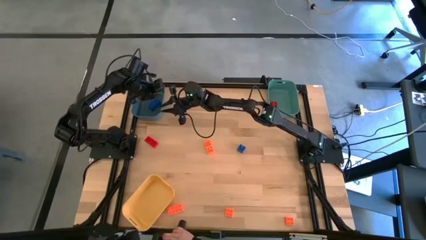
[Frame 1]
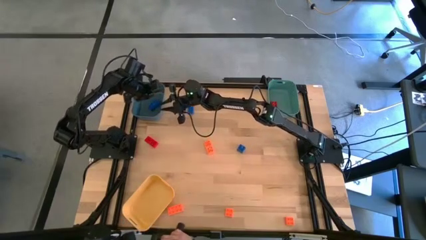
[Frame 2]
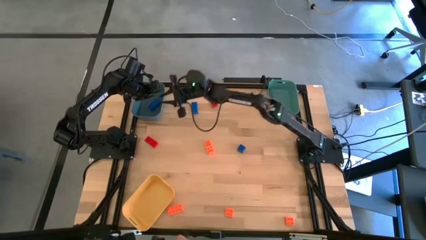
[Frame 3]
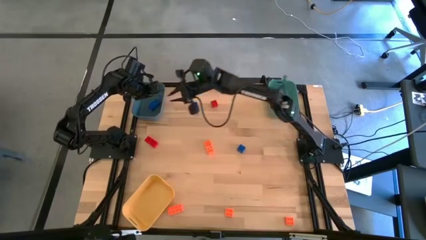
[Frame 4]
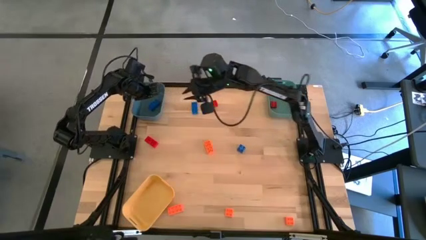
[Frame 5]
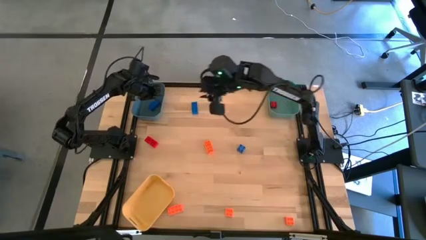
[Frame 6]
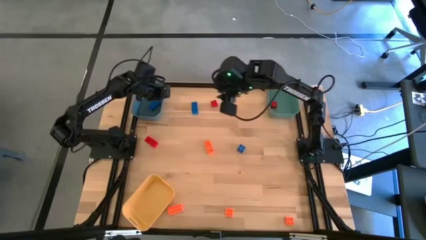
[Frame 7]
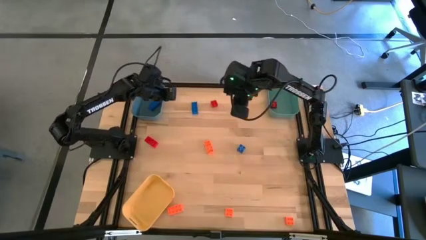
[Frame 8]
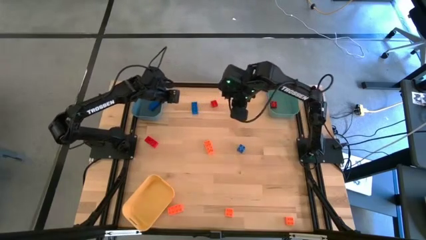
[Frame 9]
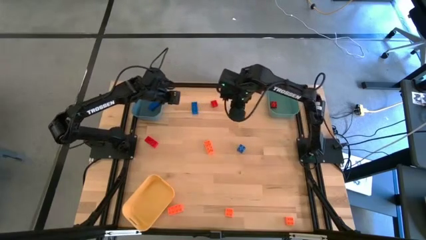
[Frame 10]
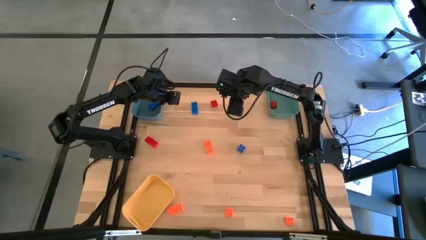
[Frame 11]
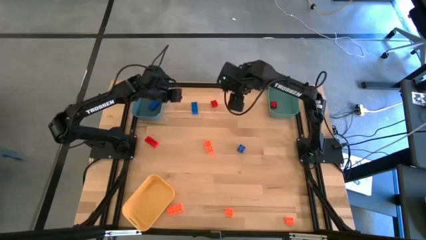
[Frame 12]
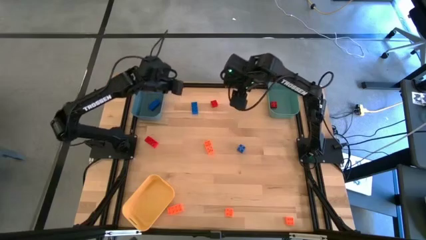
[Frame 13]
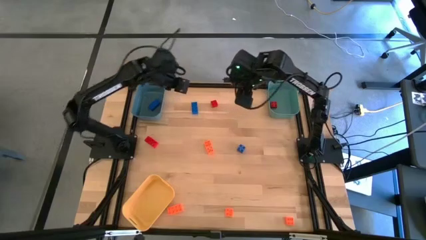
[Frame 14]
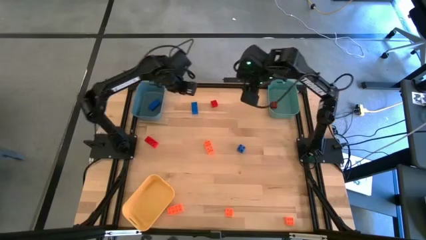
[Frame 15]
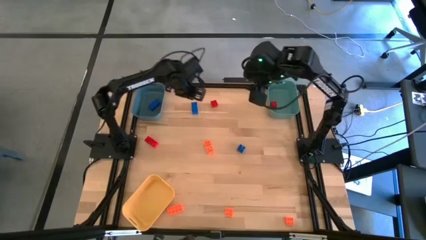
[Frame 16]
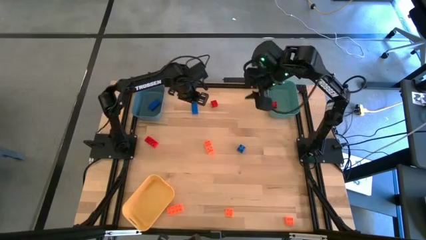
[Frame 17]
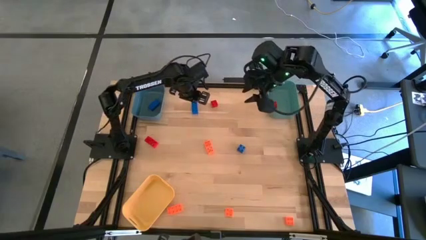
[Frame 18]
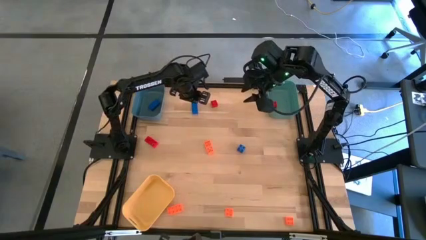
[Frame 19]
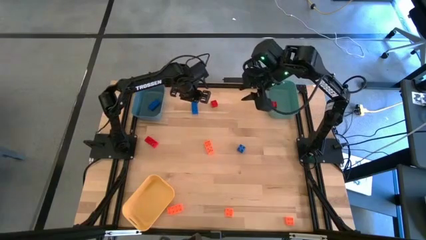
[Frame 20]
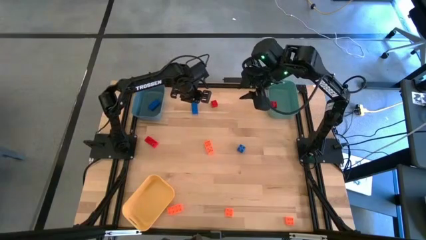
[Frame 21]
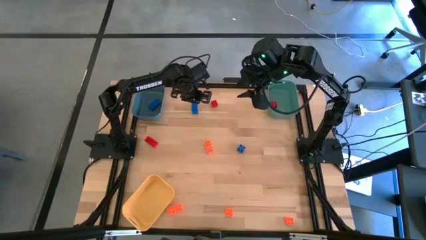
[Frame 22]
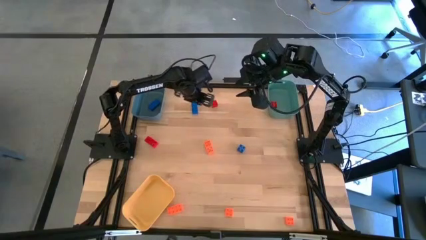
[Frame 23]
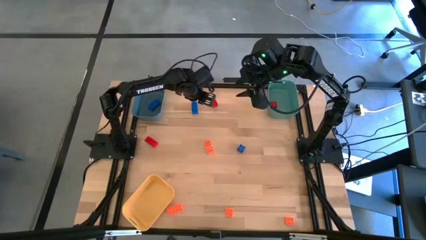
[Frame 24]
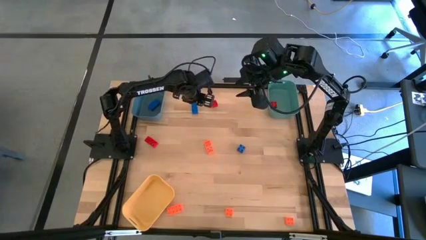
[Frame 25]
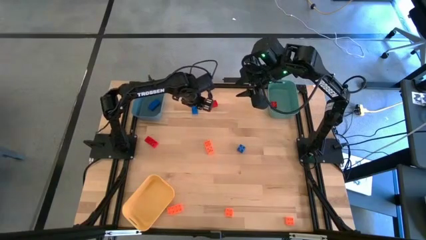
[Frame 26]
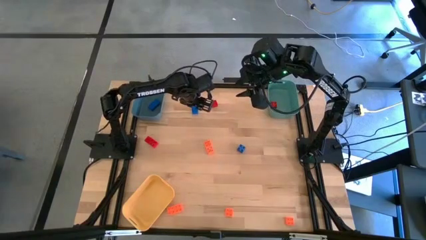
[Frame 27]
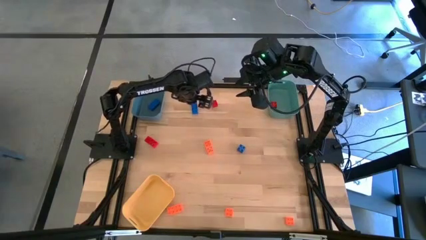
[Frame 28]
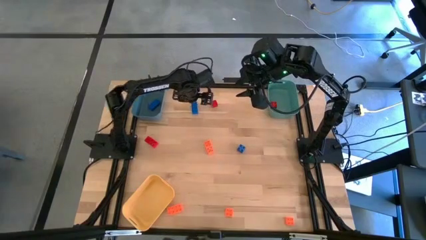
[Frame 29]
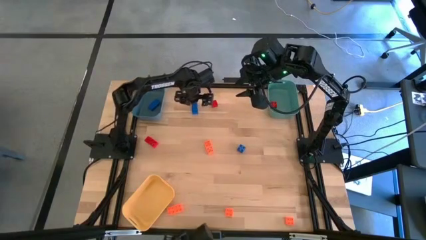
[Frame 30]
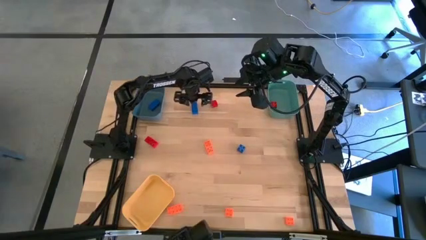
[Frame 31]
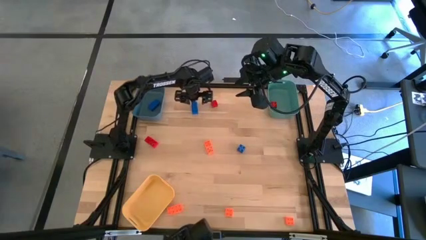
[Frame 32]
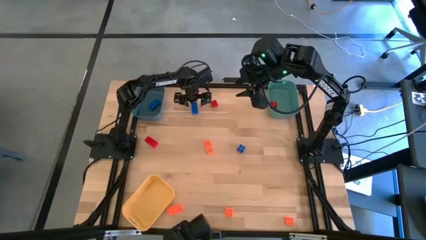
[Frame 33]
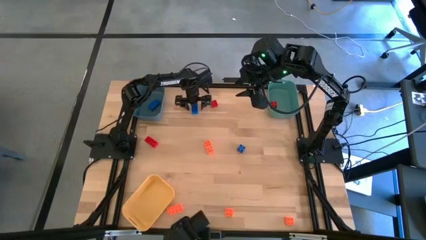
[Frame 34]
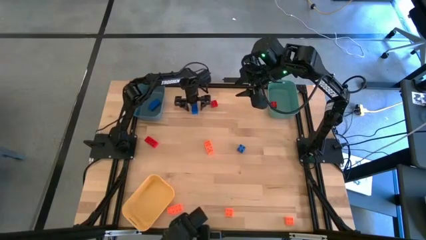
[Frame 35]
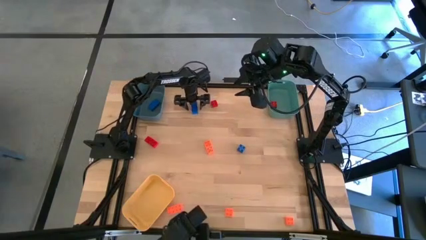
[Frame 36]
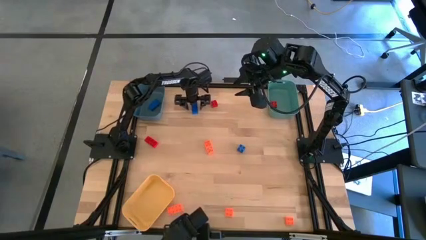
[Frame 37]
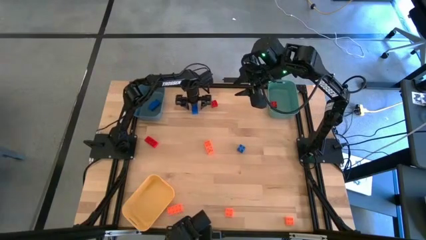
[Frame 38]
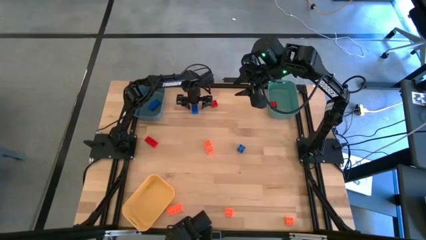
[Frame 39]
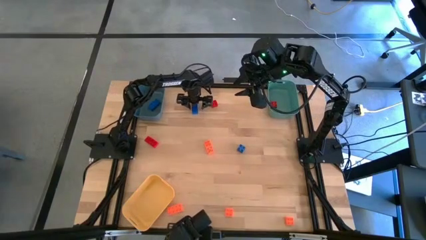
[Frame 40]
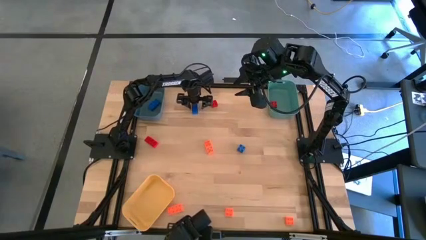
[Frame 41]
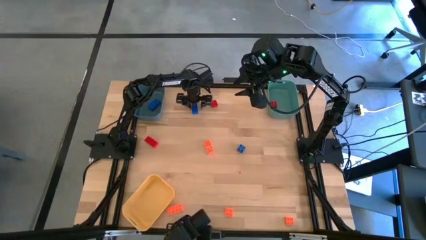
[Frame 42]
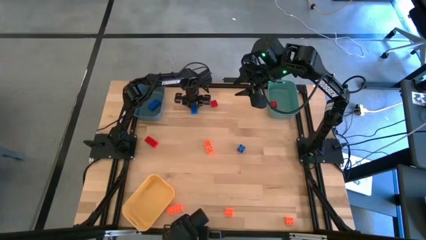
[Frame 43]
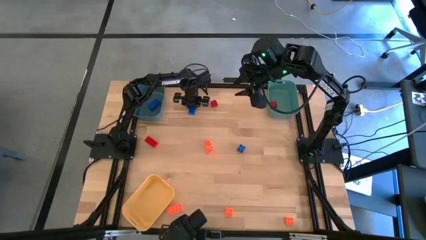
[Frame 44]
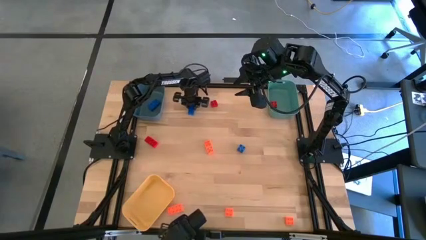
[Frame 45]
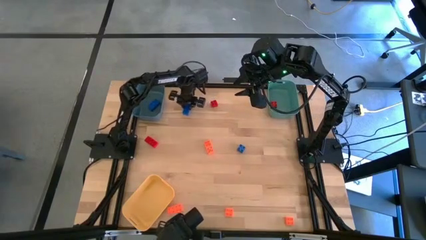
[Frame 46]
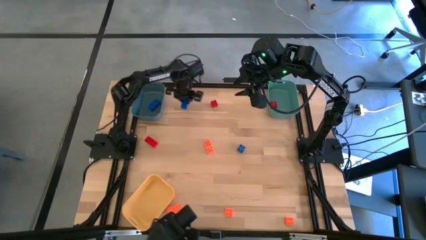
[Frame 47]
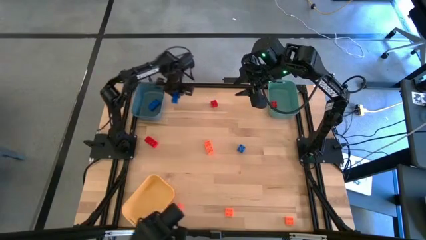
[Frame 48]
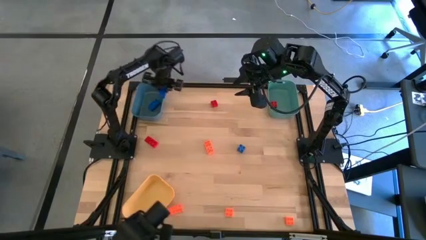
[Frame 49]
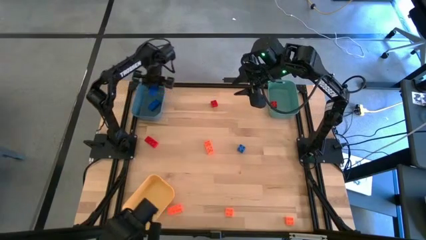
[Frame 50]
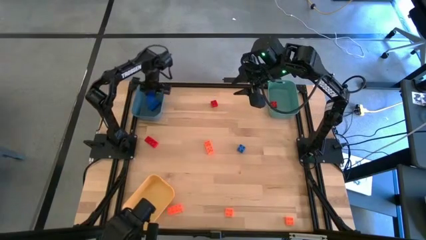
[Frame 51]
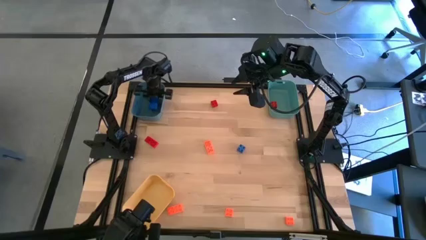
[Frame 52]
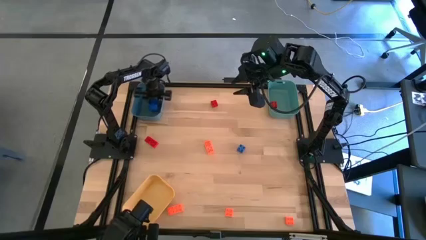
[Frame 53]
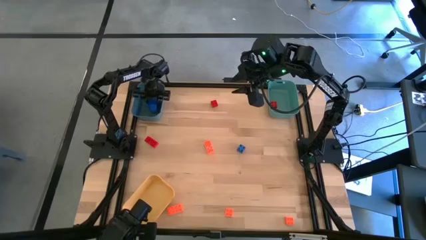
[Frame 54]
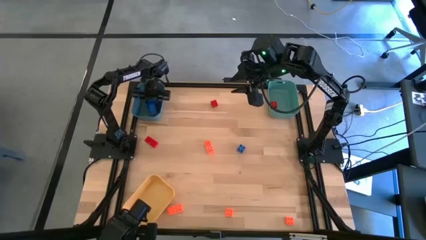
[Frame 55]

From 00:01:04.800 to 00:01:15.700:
Task: Sort & place blocks by color
Put the top blue game piece into the blue bin

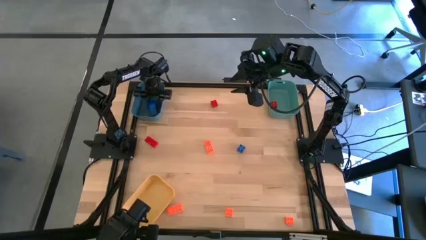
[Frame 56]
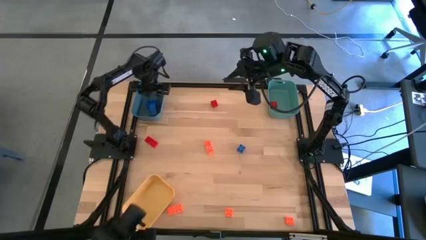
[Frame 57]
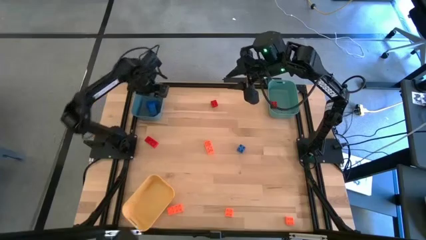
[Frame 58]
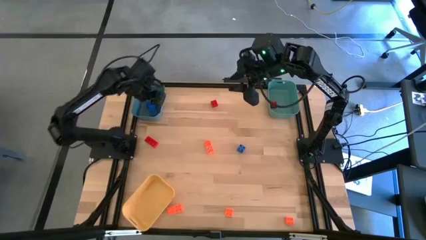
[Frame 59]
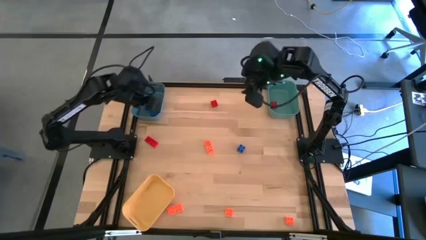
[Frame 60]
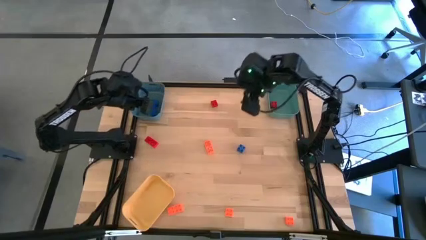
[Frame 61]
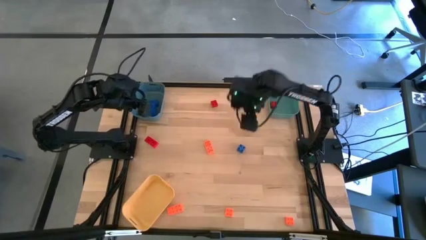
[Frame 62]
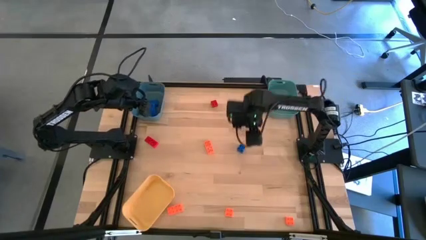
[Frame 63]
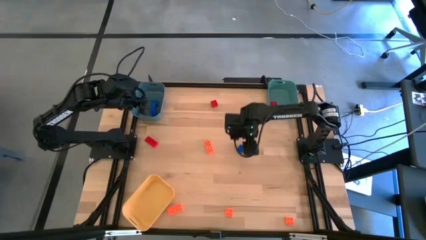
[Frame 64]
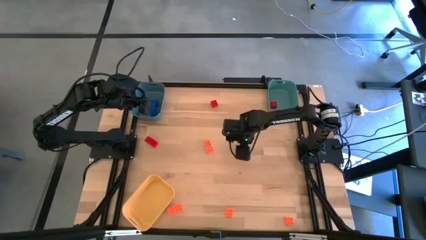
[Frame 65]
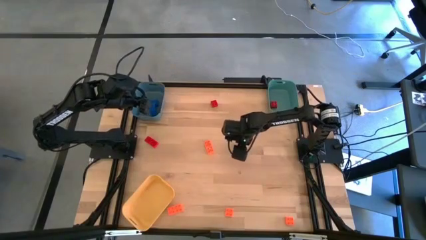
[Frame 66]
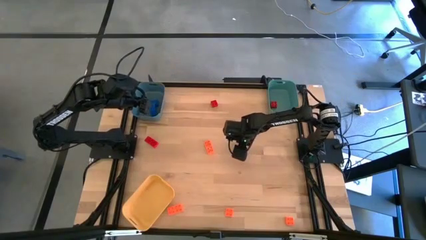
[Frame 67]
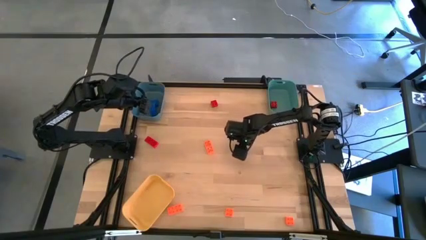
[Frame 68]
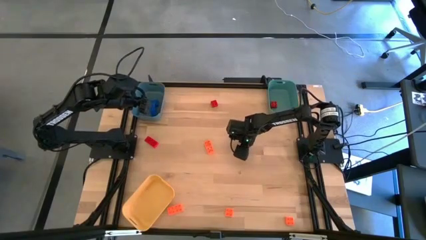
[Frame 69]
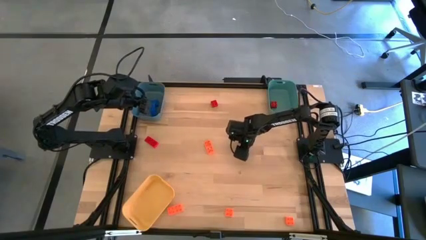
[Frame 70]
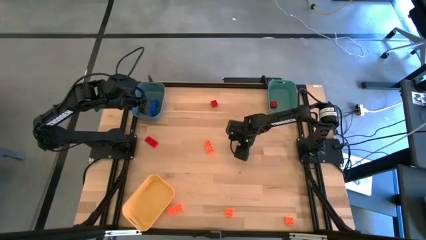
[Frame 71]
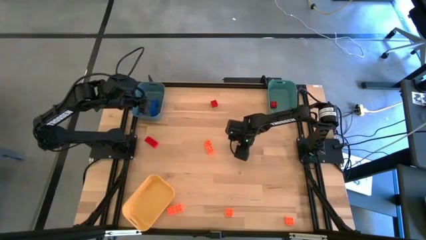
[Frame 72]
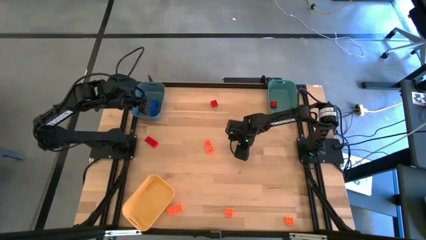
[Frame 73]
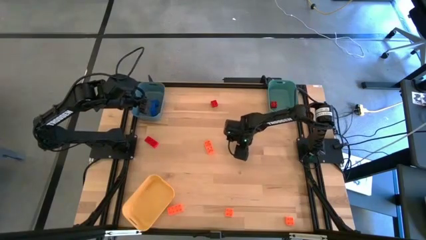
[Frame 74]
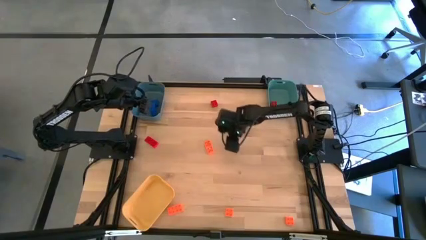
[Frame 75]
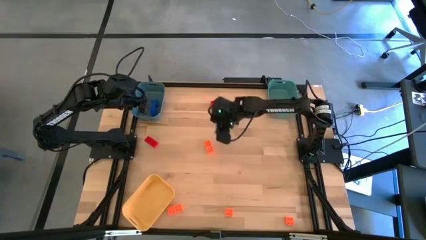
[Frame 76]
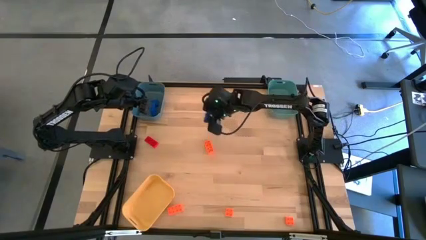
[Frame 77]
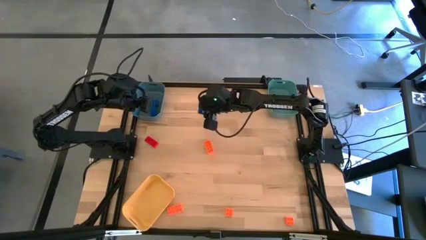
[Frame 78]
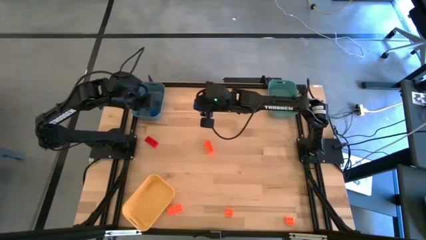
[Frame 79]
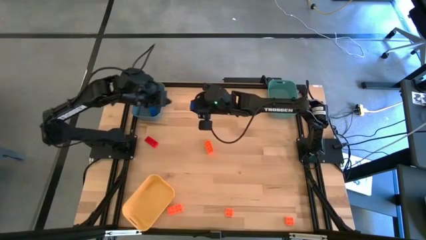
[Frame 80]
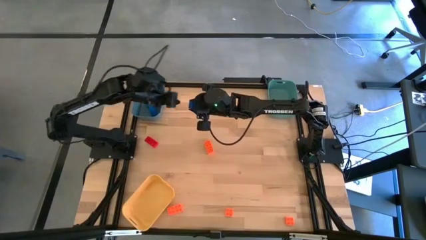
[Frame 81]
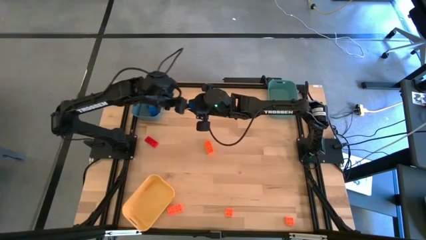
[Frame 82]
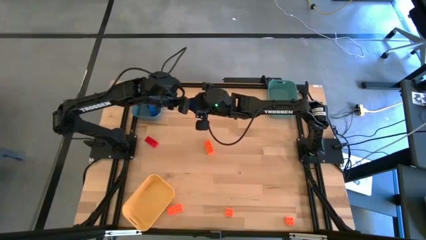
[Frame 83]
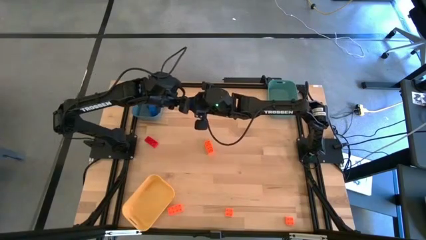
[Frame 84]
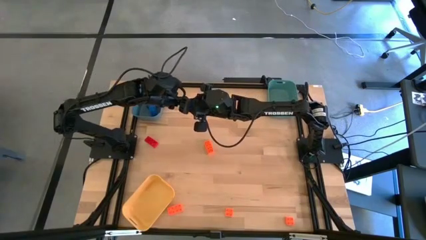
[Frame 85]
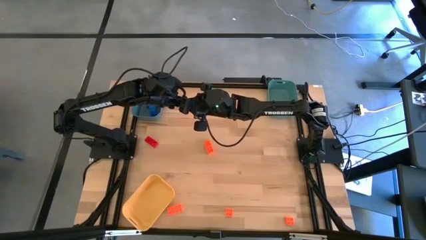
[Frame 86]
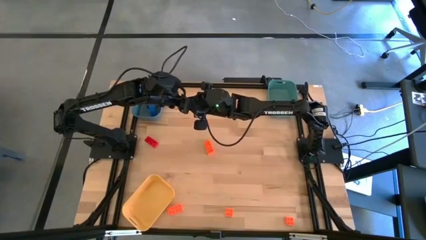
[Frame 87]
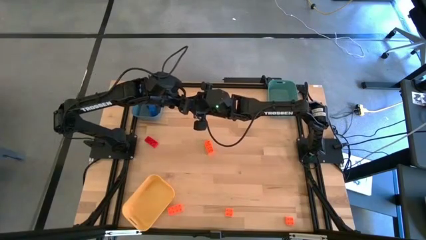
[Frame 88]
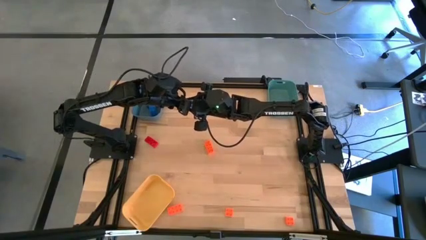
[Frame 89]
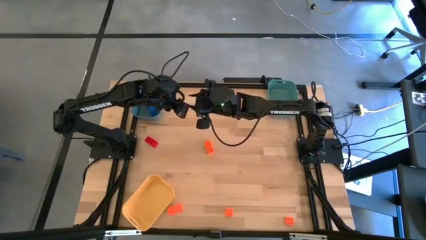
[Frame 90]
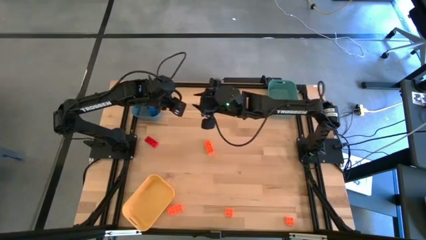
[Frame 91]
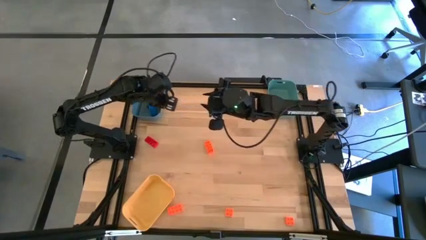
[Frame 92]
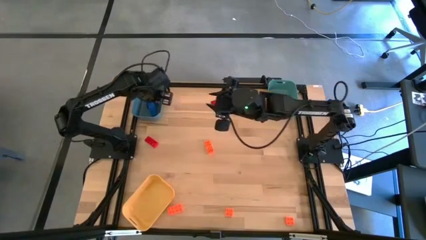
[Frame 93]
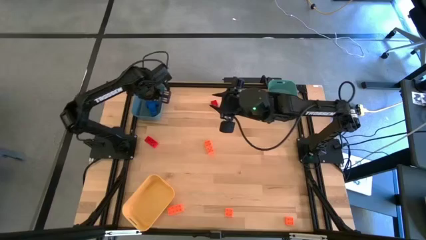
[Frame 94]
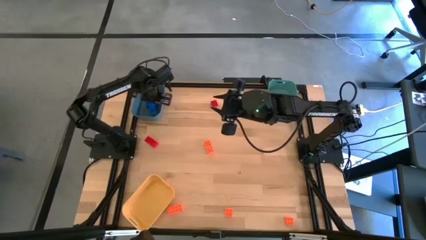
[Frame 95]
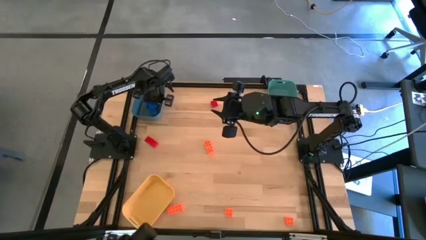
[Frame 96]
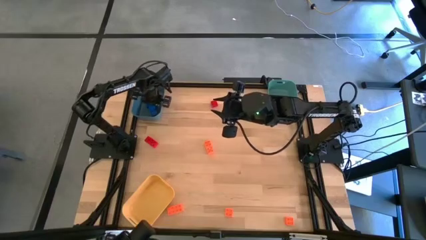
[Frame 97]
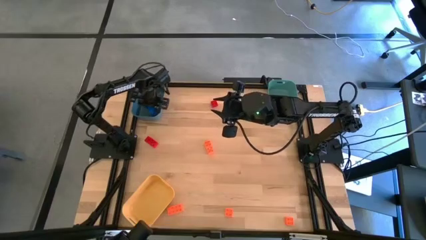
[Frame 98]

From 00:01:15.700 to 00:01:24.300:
Put the blue game piece into the blue bin
